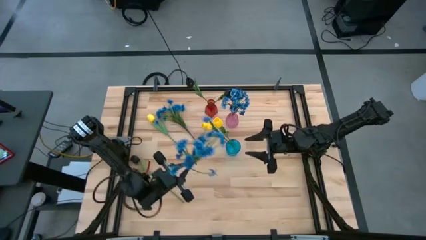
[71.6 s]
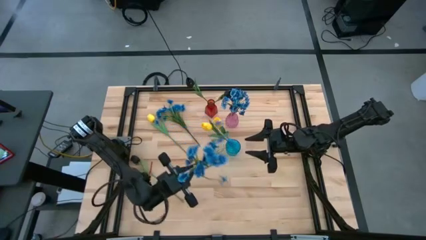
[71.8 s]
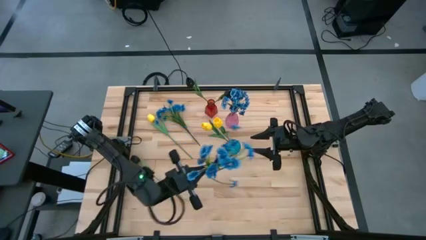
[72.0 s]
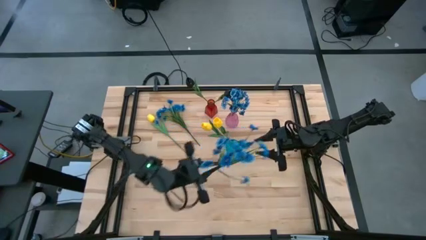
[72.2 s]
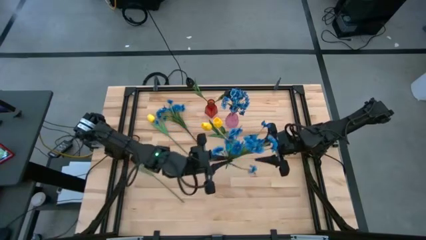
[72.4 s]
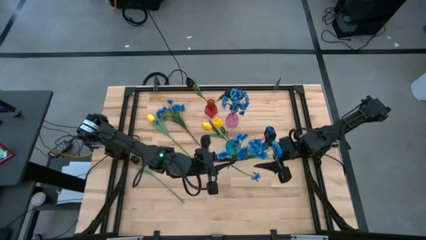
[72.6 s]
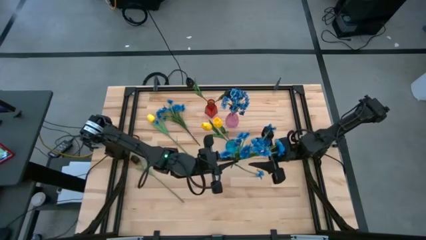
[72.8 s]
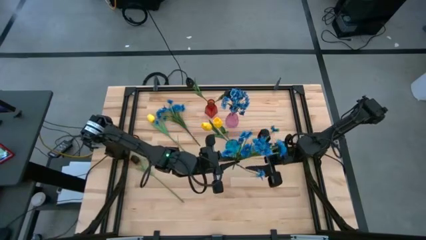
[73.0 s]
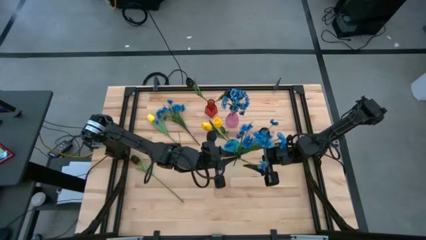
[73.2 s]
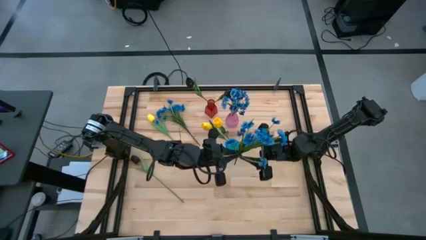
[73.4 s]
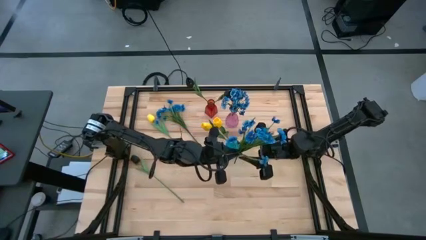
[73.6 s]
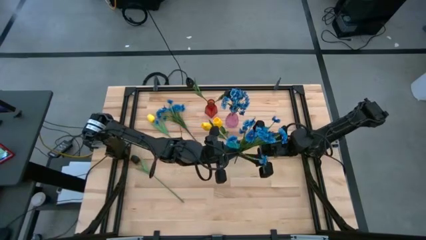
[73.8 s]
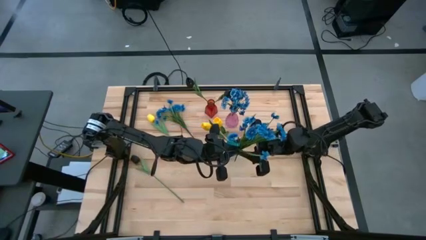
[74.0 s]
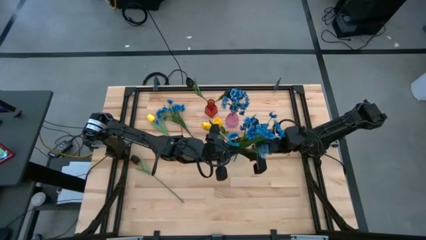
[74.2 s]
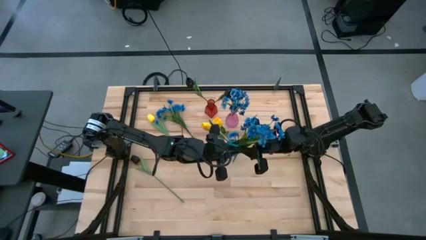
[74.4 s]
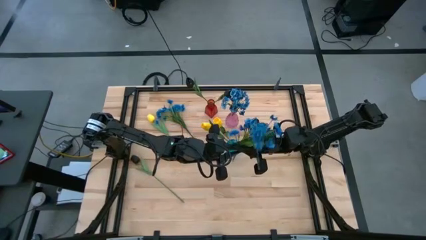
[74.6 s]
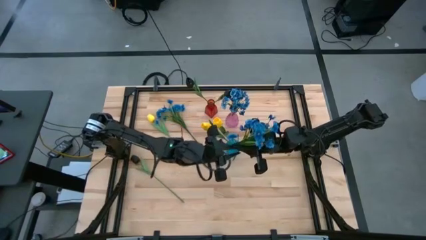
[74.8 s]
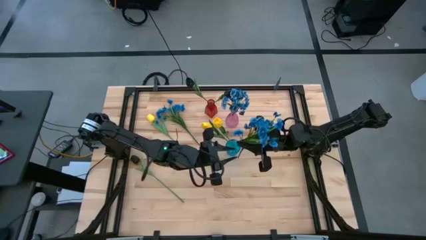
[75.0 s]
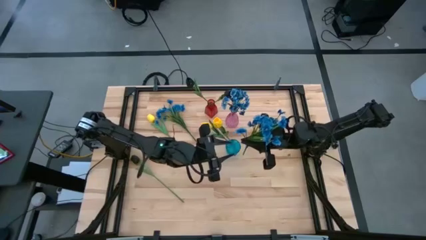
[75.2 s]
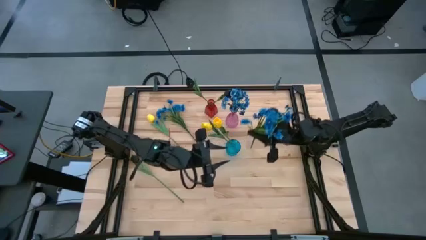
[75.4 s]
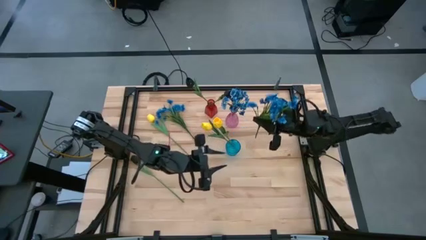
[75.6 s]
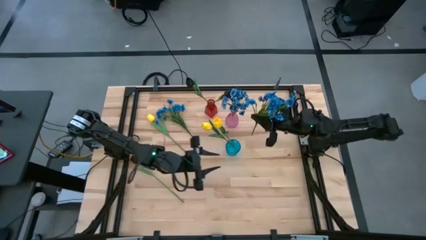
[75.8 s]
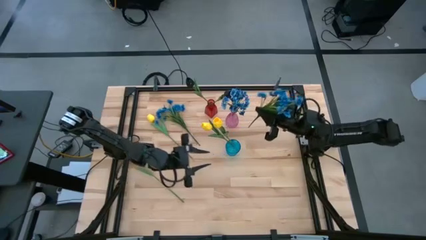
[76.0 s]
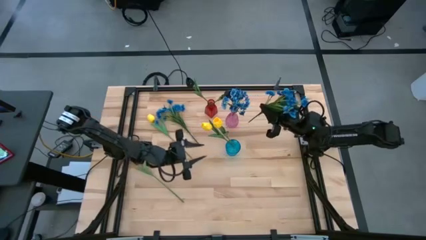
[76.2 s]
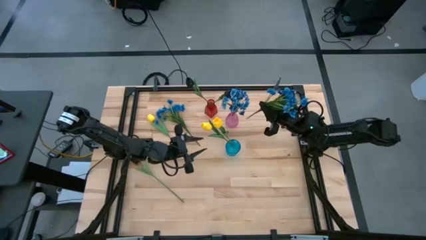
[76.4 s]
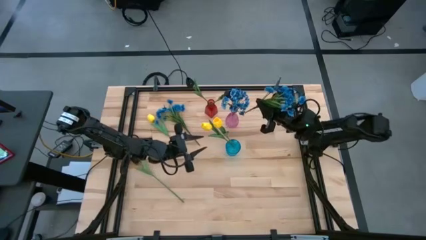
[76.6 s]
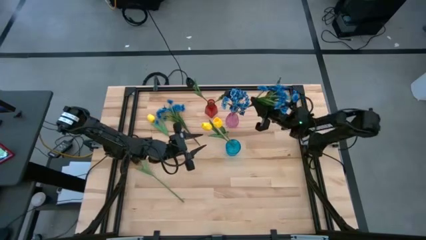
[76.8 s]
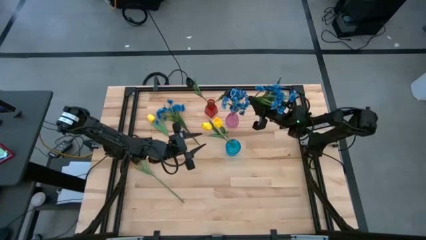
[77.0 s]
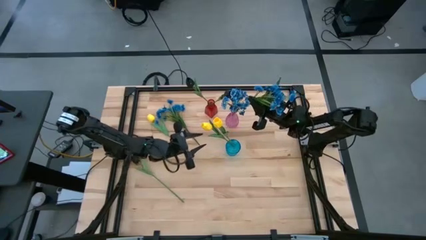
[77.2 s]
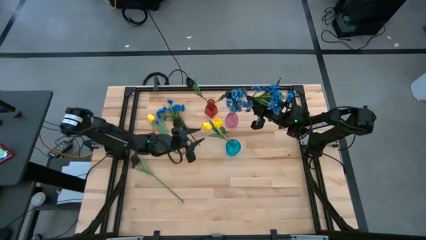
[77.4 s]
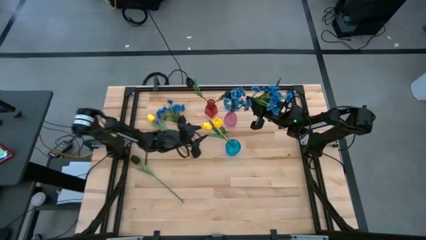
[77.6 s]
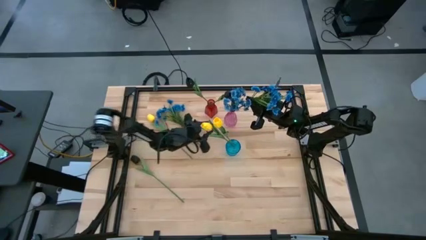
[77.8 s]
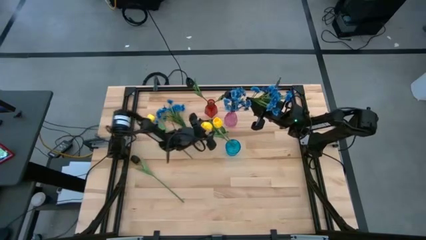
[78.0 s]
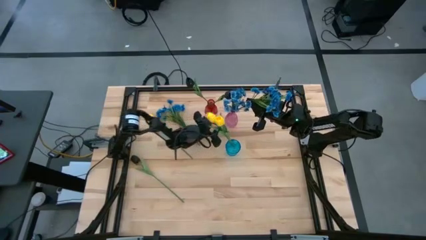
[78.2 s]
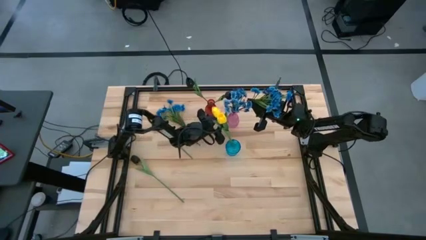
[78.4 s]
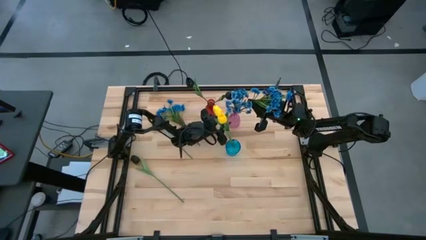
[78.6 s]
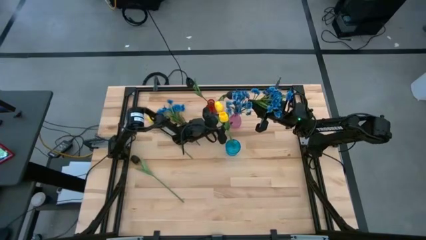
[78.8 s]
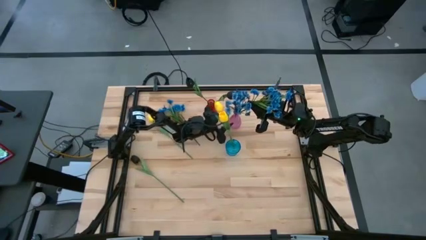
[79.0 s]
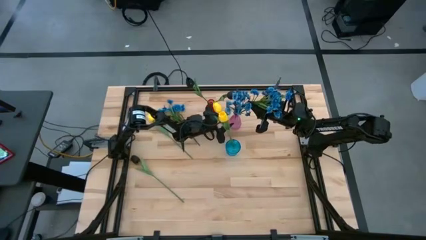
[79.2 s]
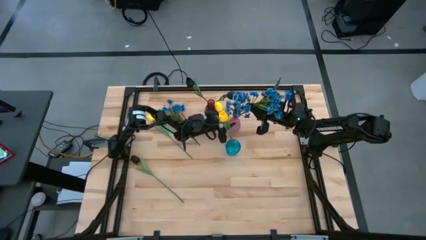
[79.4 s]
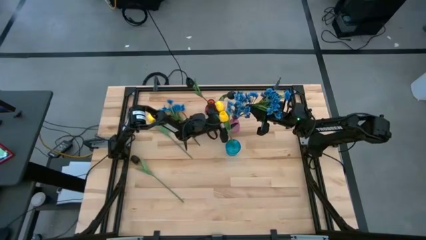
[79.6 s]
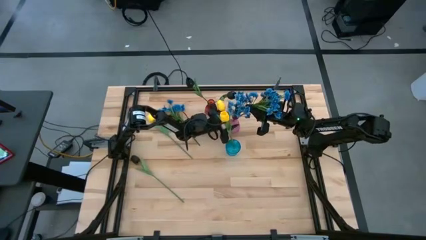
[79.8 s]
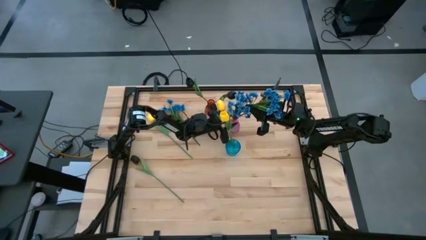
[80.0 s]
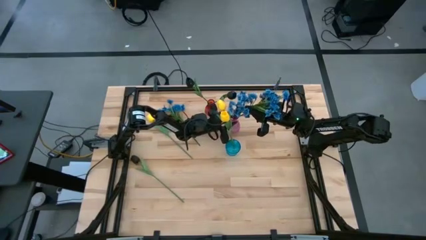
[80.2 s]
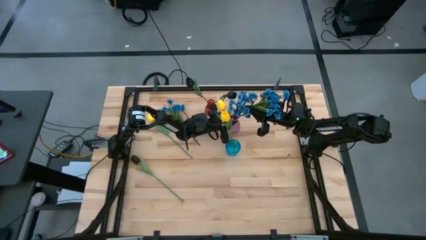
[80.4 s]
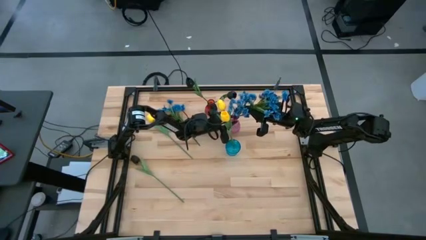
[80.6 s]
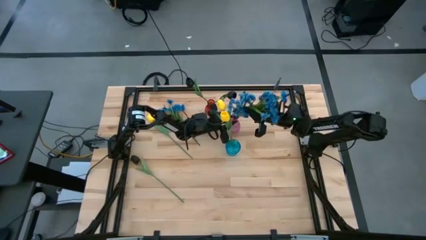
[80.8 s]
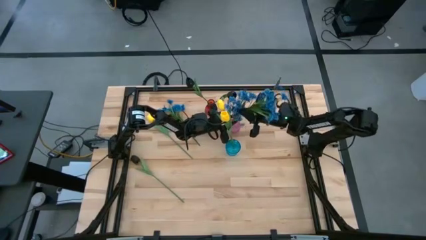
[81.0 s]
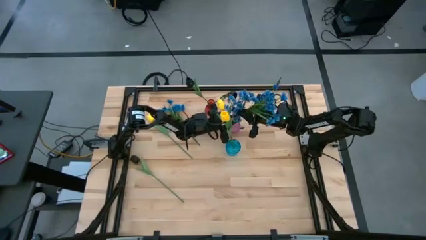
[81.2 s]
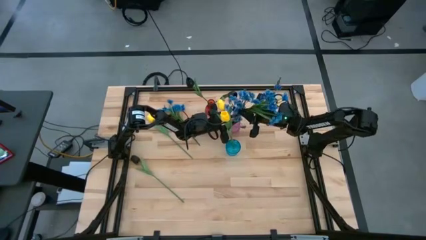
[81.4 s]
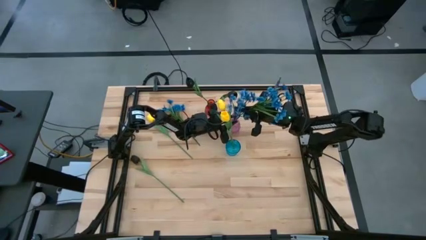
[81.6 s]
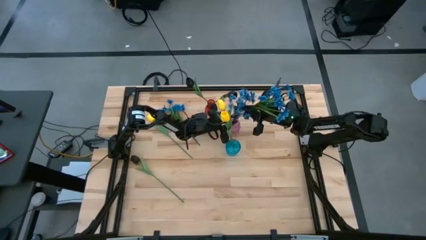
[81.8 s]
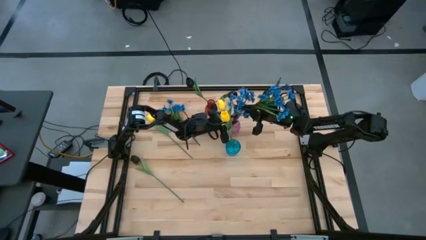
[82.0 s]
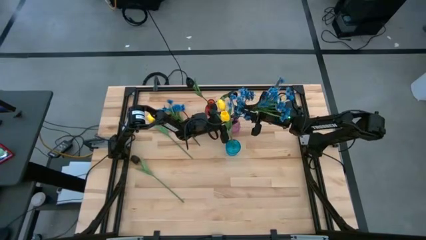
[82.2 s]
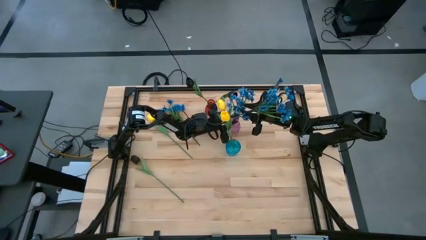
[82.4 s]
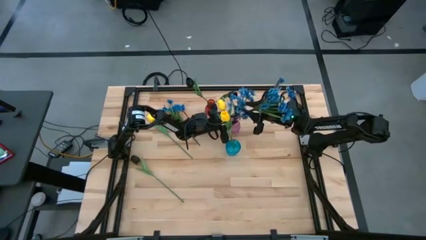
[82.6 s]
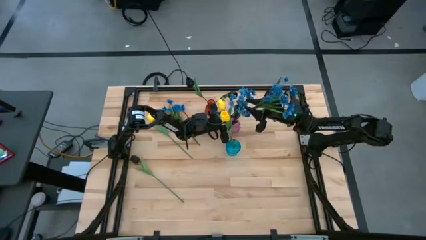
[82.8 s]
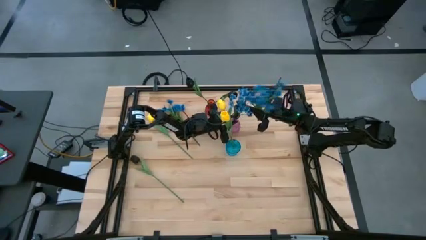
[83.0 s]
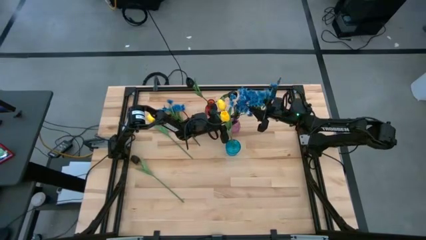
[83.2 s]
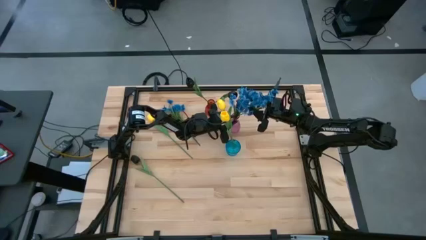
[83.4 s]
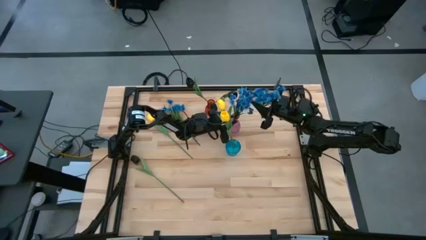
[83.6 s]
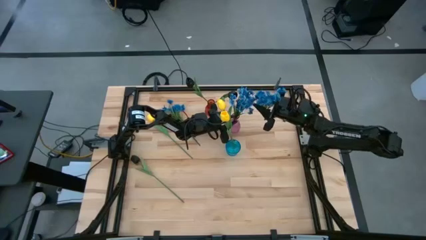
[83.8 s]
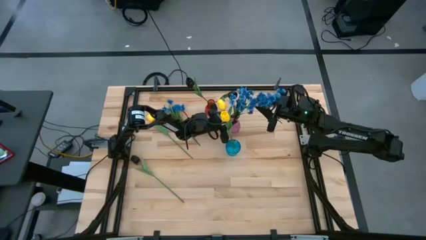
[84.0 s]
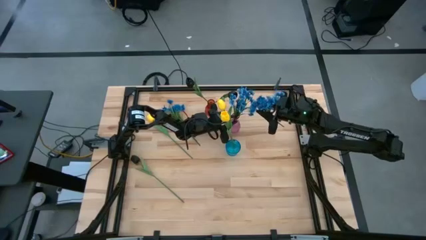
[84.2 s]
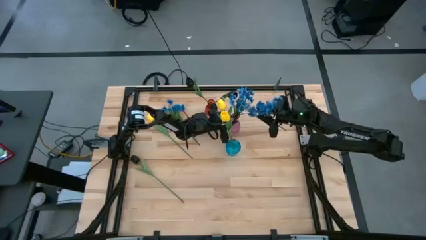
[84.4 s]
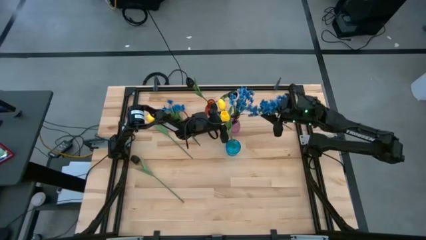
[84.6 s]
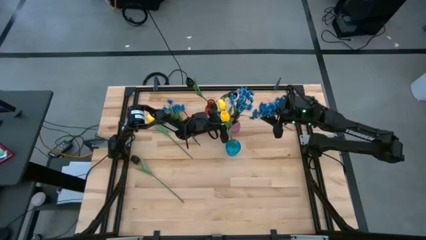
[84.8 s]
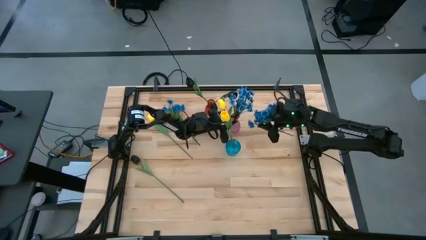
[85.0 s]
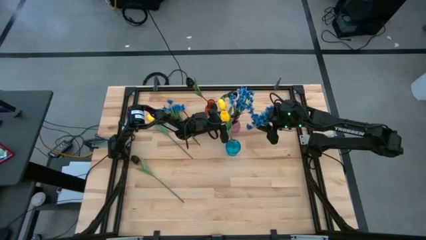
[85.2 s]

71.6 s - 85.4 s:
Task: Sort flowers into vase by color
Put the blue flowers into the pink vase

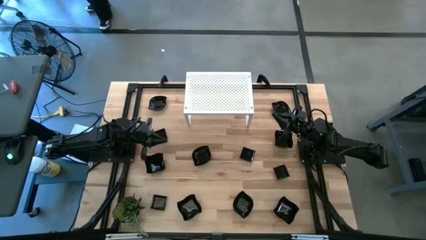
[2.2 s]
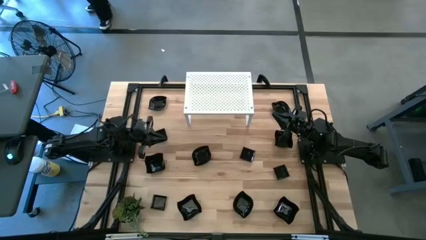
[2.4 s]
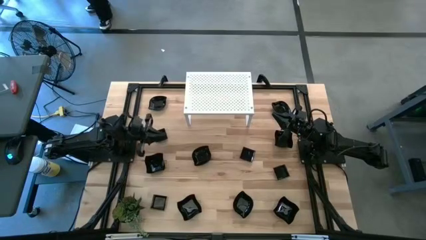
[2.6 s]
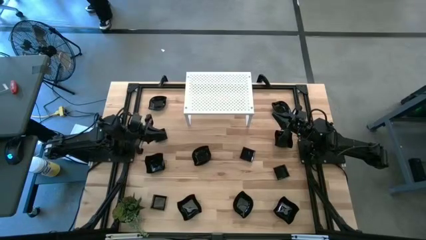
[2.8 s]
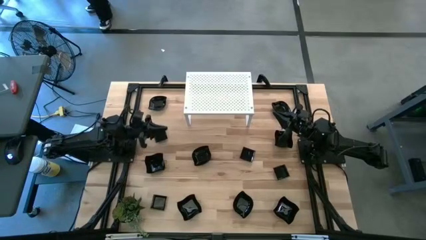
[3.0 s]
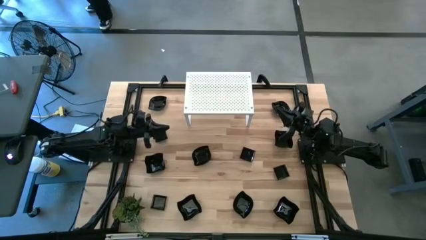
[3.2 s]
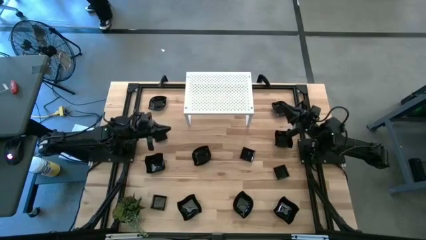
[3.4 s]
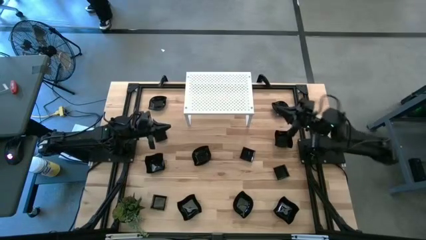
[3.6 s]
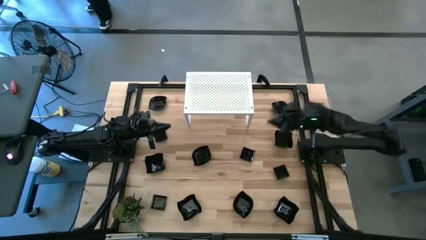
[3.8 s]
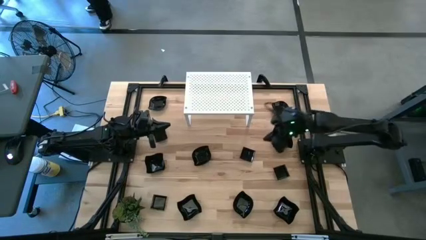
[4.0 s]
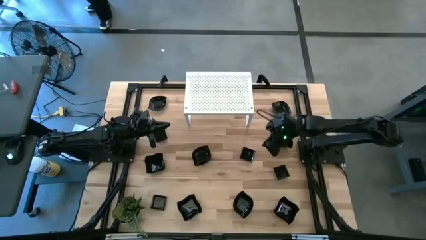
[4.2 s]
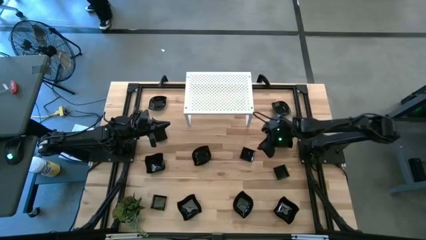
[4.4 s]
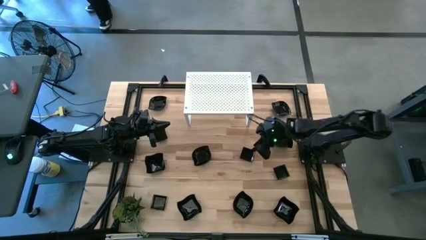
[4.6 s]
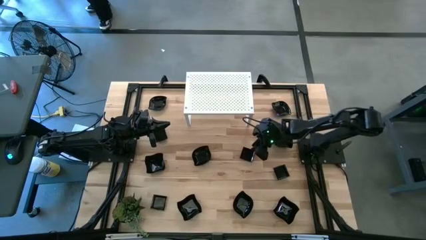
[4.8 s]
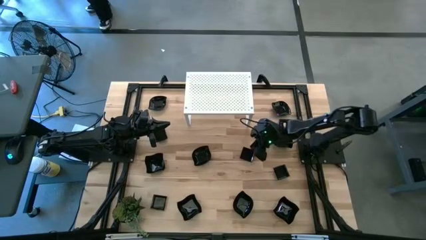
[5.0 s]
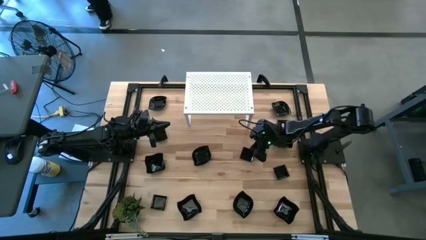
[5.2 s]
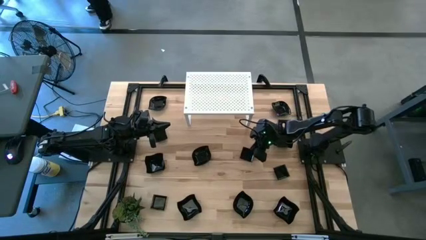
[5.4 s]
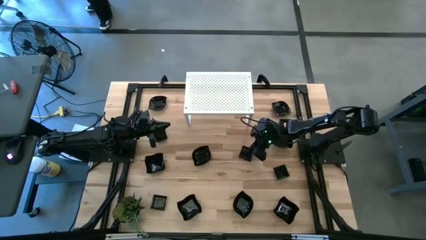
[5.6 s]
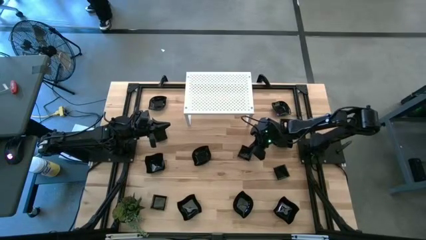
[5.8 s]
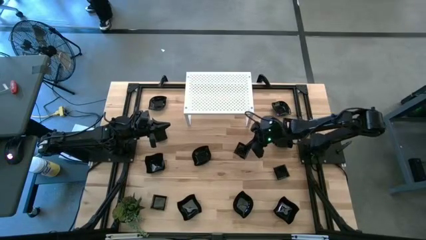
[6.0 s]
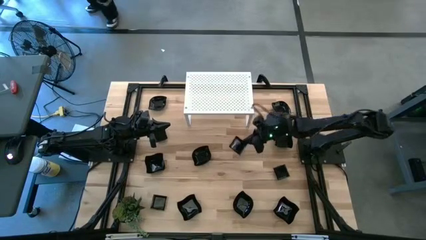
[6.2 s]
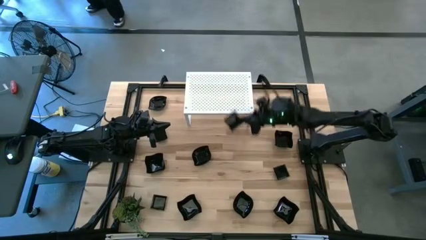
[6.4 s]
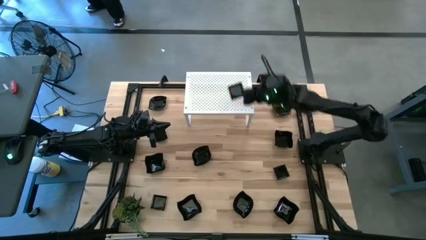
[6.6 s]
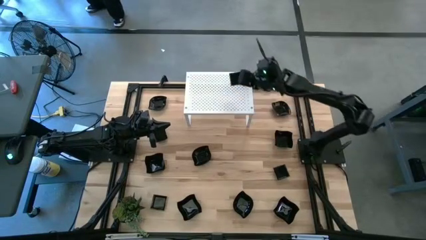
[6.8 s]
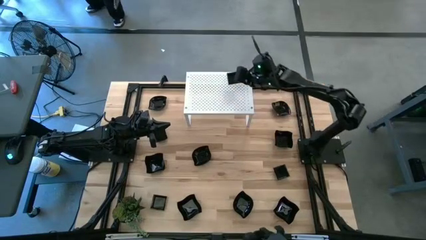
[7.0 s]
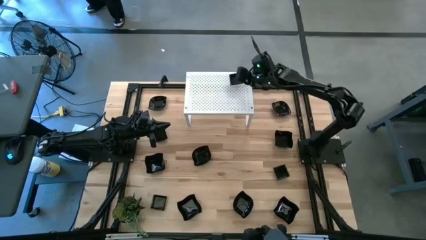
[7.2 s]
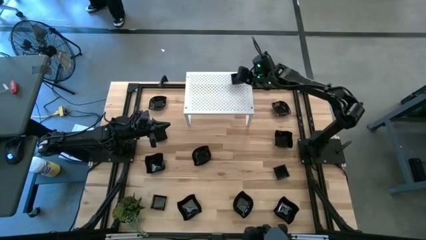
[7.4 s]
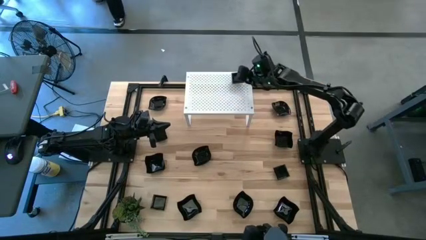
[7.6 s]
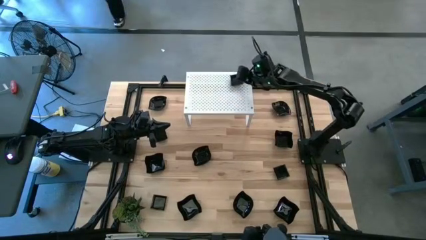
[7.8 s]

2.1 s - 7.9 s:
Task: Pick & Place Mini shaped plates
Put the square plate on the shelf
